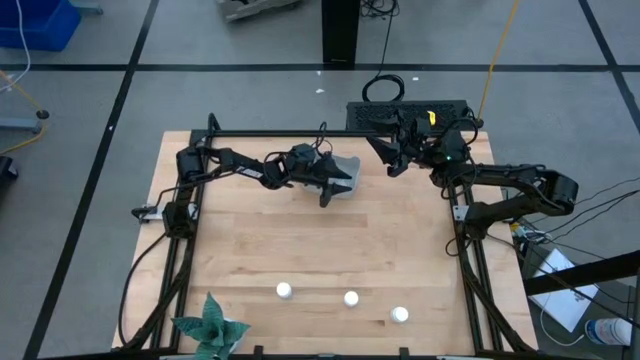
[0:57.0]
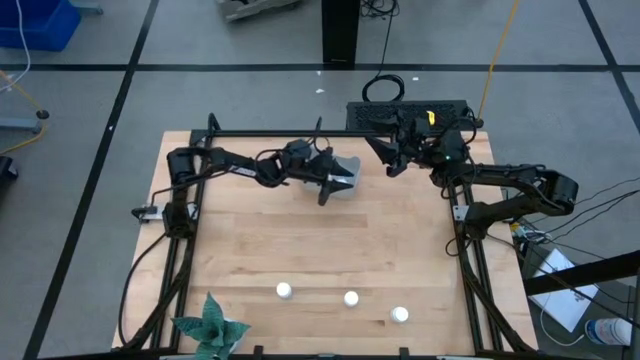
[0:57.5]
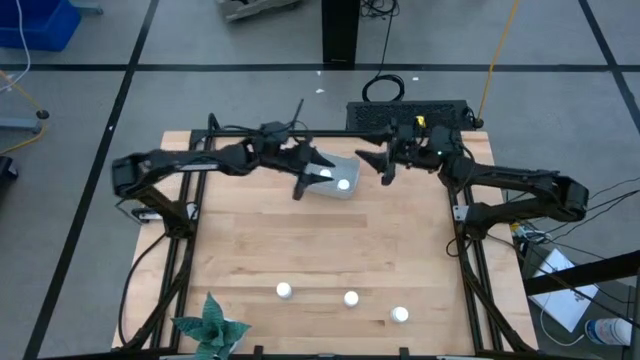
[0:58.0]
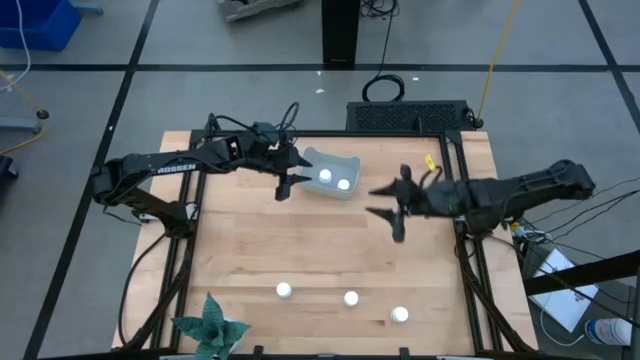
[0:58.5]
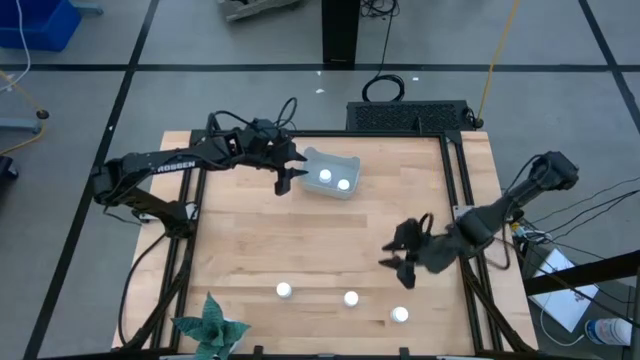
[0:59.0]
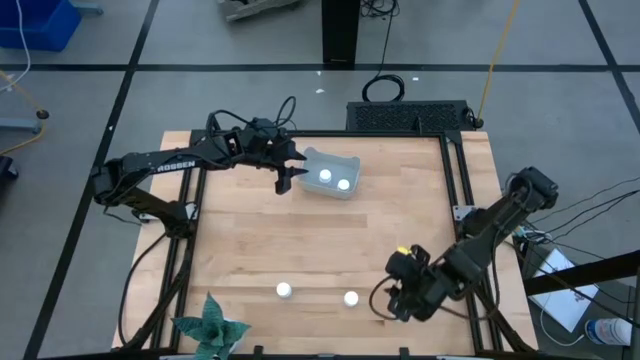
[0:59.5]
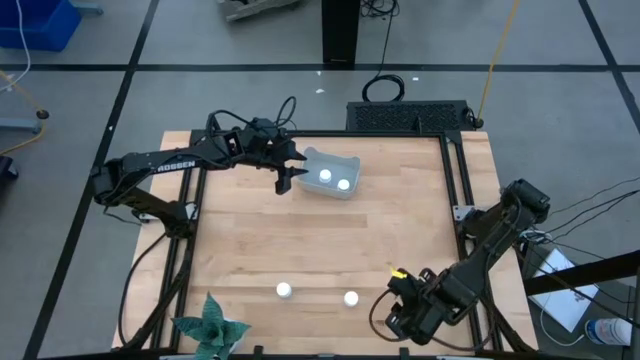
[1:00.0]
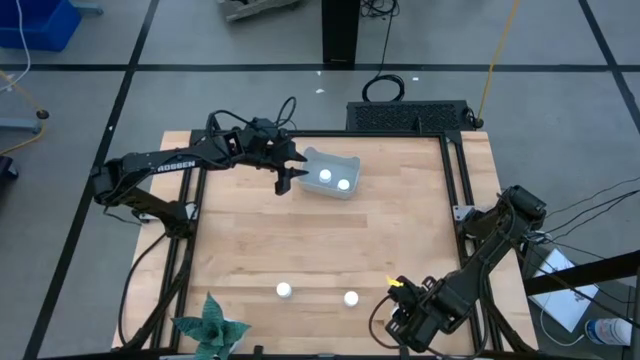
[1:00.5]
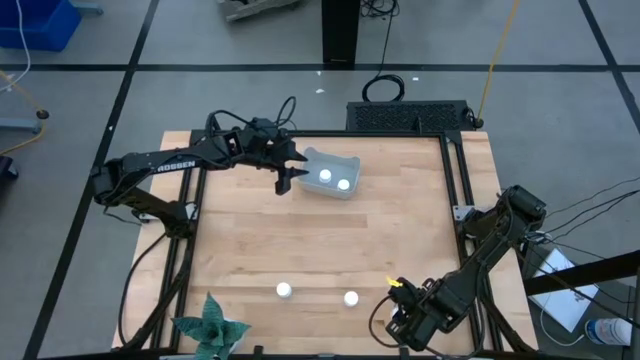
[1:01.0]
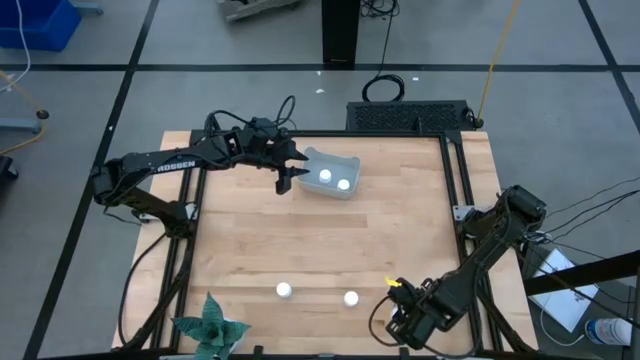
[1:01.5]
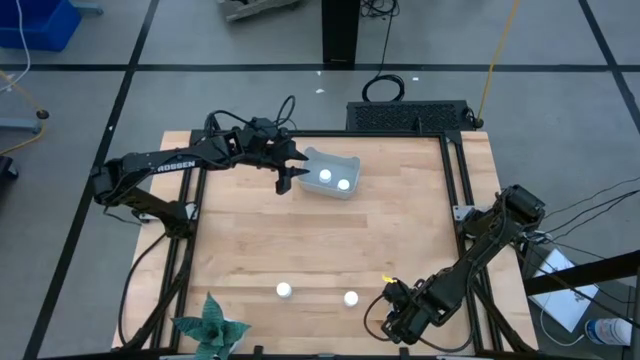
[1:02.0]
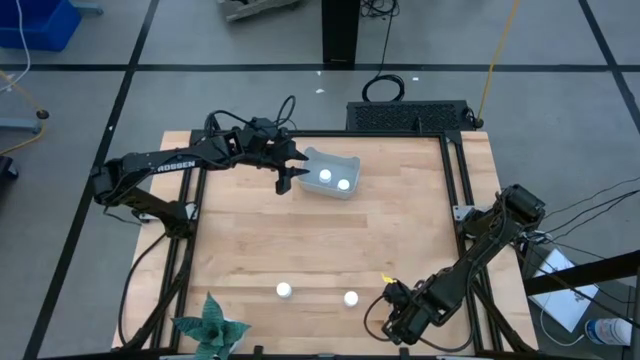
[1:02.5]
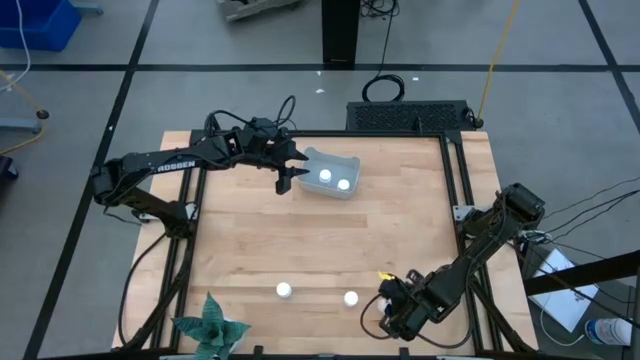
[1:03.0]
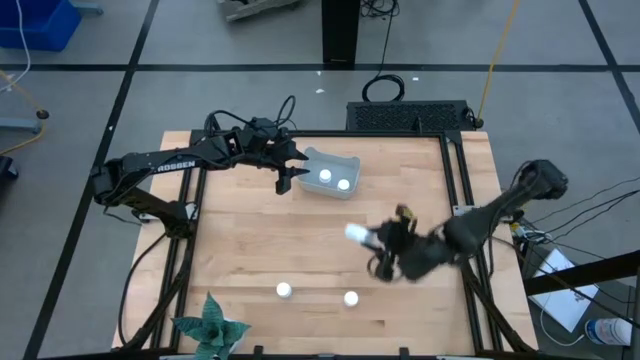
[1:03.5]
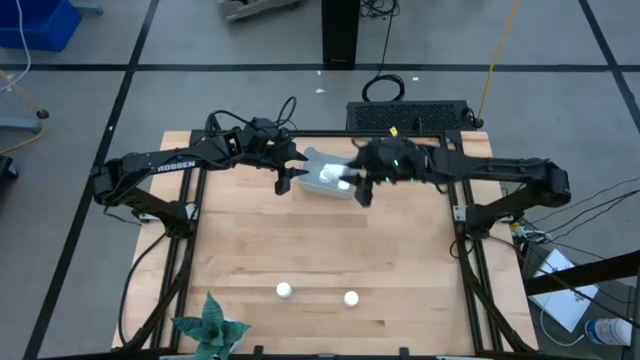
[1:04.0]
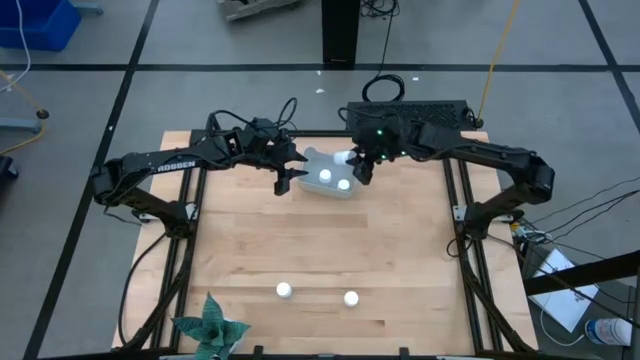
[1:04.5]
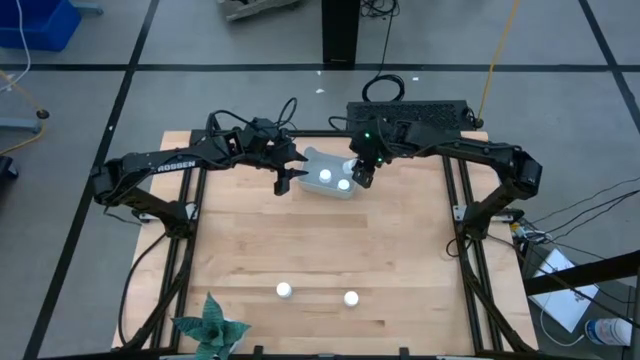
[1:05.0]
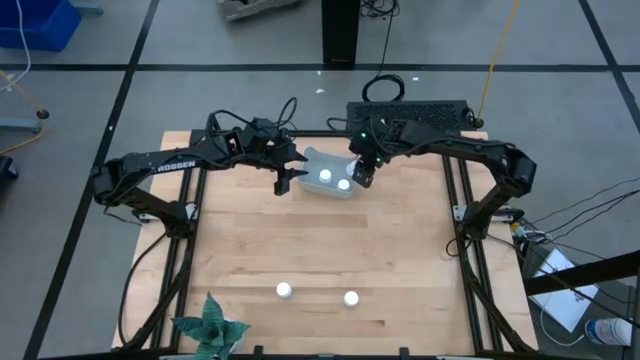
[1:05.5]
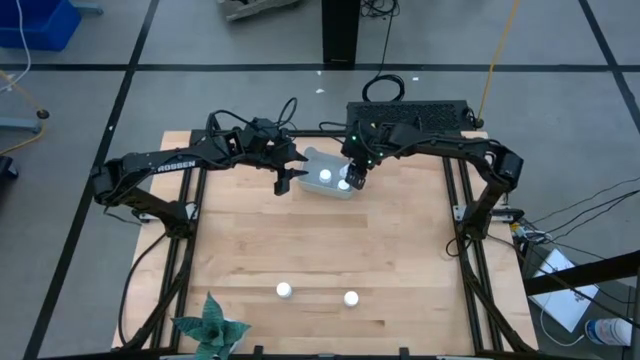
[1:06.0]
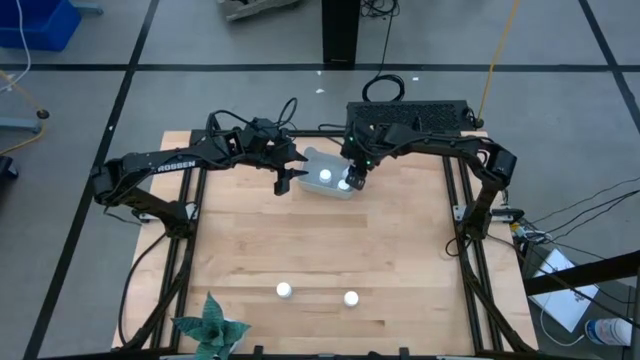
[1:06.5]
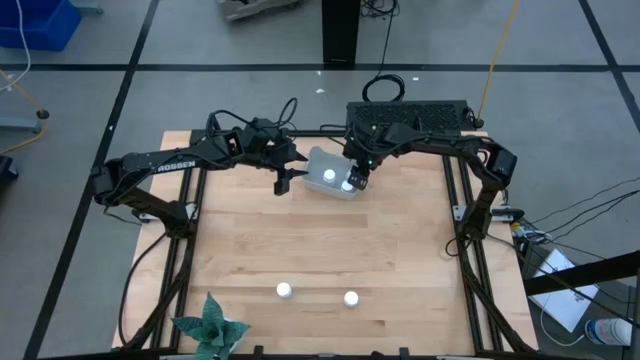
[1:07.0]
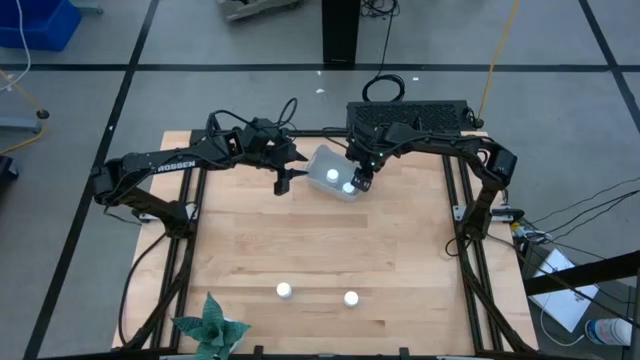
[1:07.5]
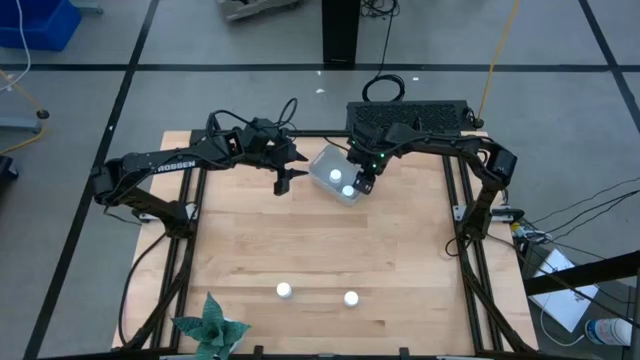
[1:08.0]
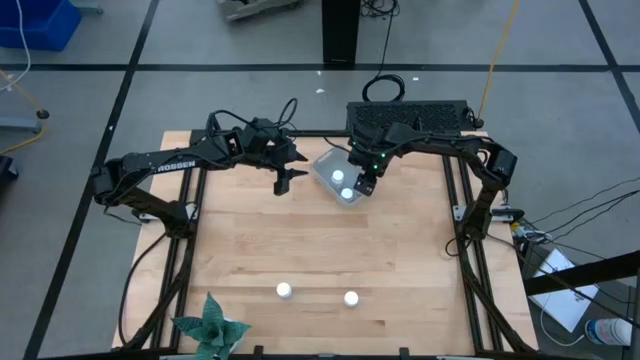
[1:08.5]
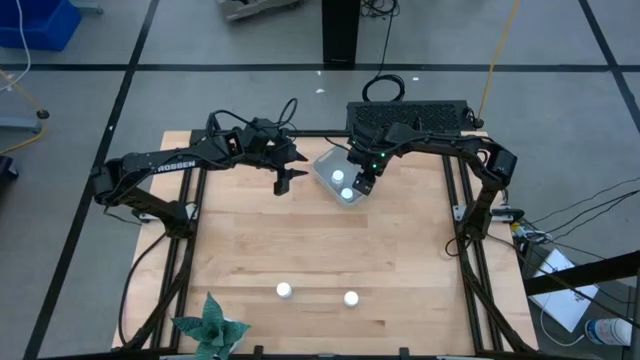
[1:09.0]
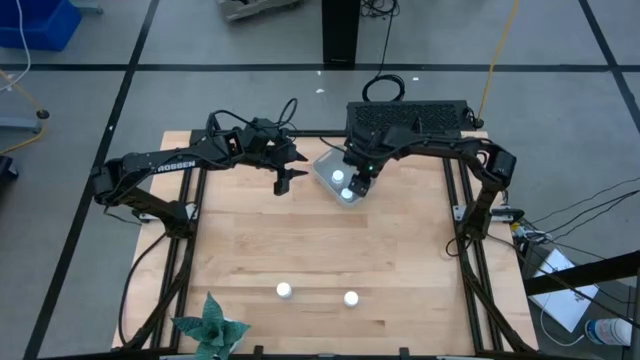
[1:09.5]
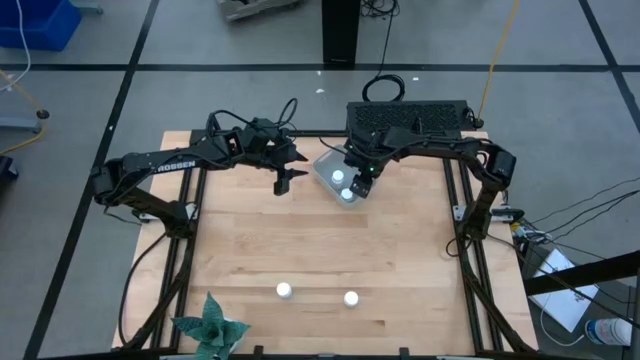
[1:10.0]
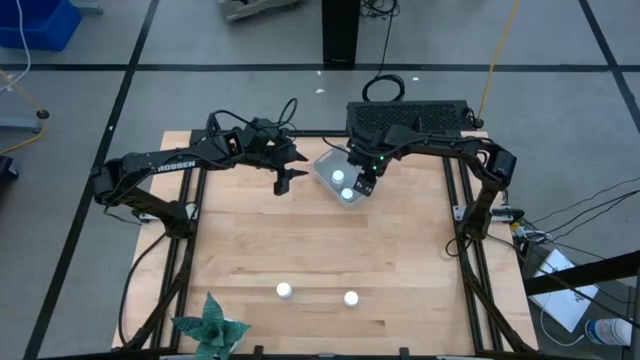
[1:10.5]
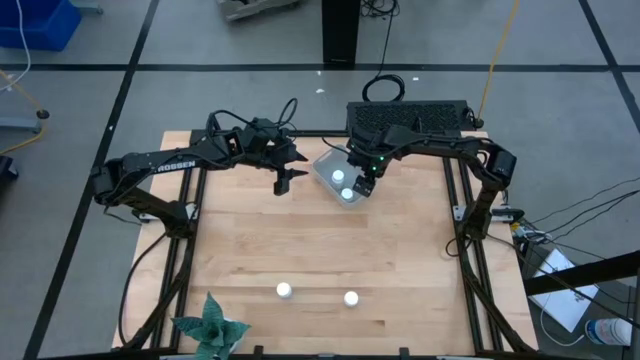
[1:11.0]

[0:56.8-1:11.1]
Task: Pick and place pill bottles into a basket
Put the white pill bottle into the gray bin

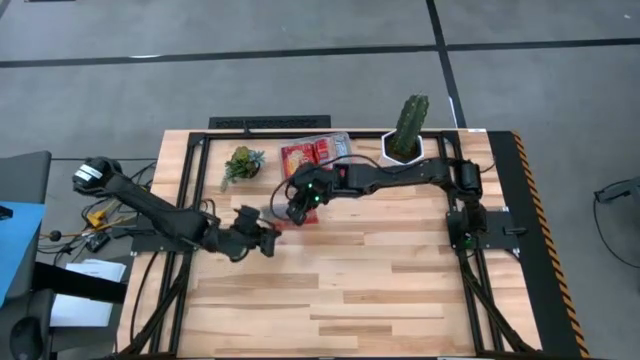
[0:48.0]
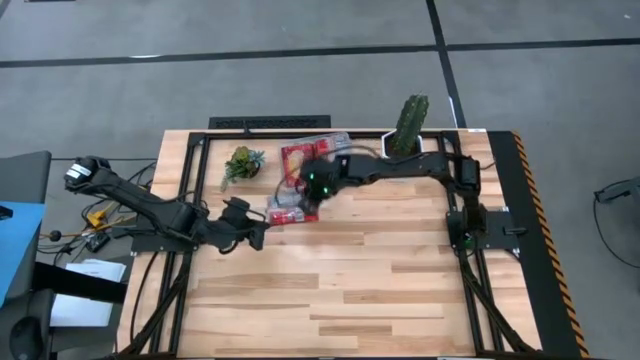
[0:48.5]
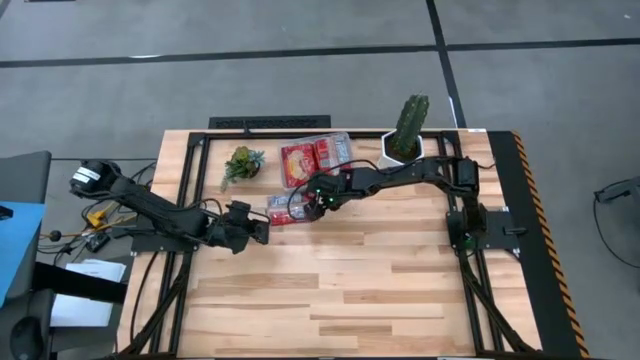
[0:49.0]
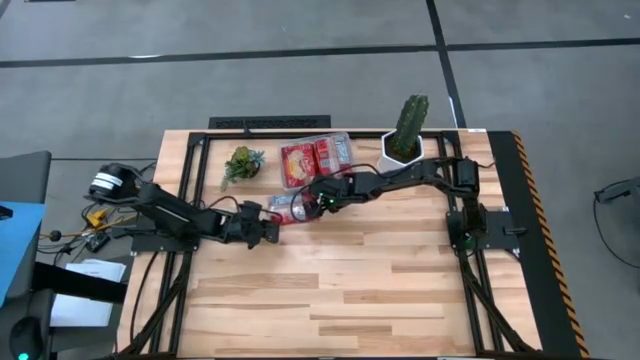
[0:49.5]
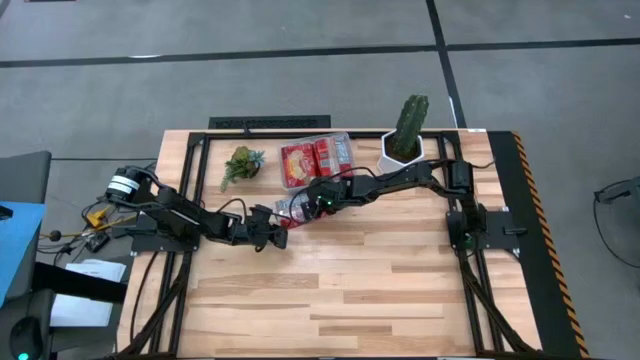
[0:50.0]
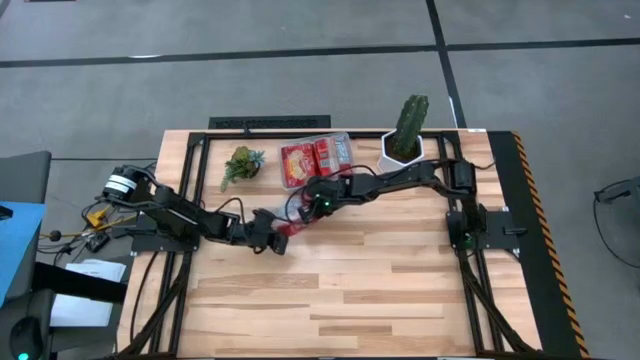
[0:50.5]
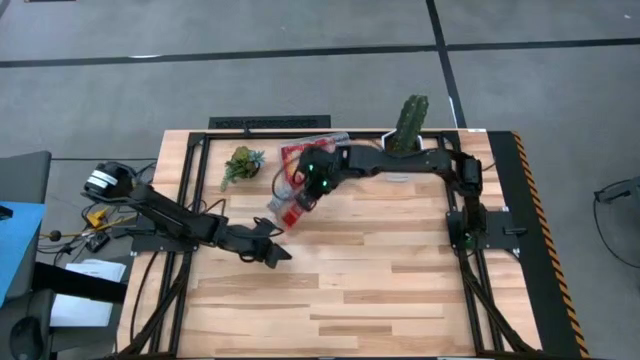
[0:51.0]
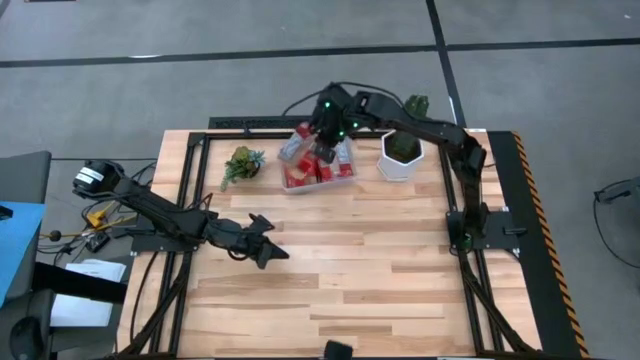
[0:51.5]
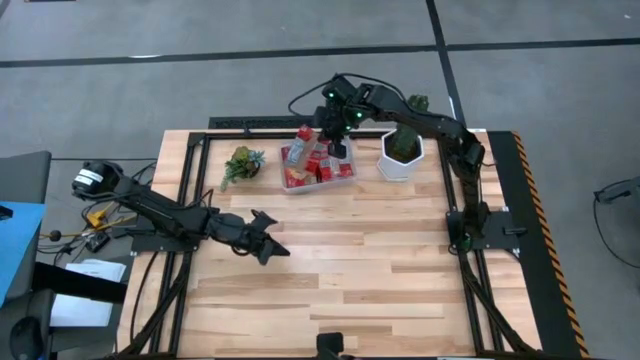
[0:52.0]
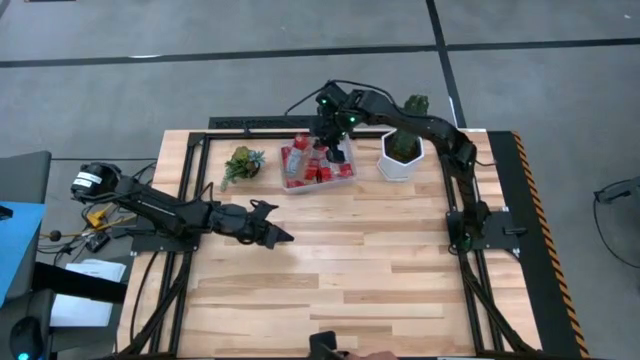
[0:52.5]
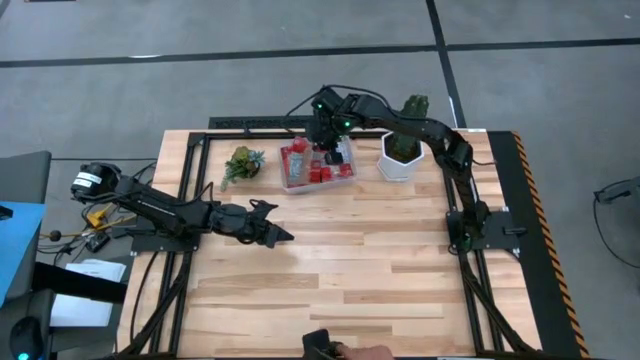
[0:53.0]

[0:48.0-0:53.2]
Task: Sort popcorn bags into baskets
Put the red popcorn bag into the transparent bin
